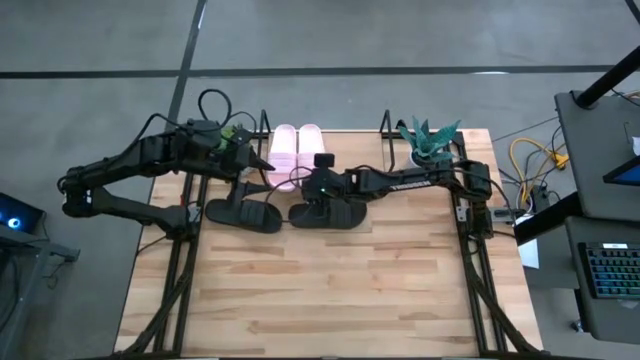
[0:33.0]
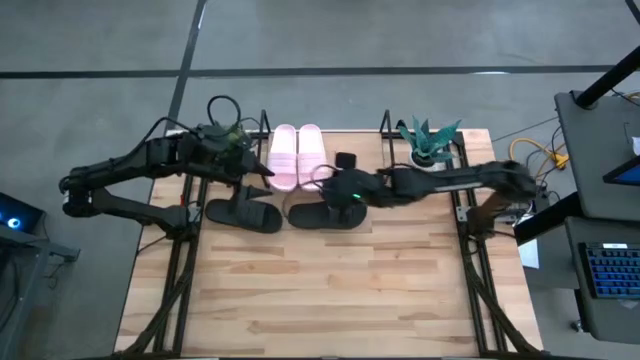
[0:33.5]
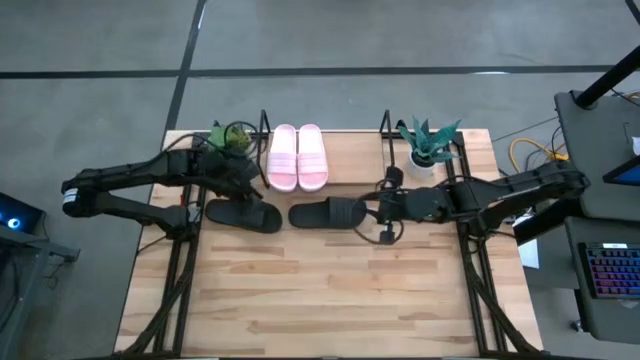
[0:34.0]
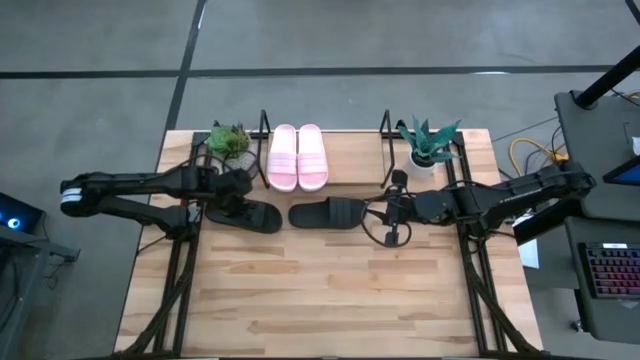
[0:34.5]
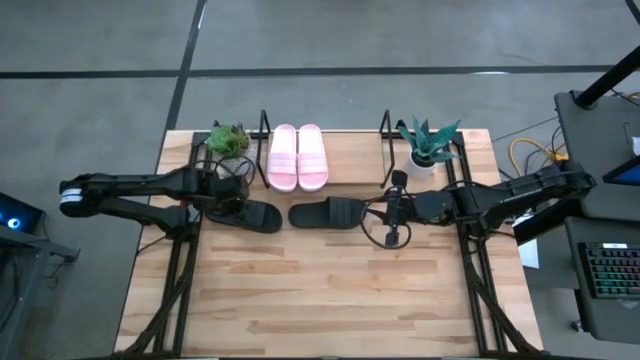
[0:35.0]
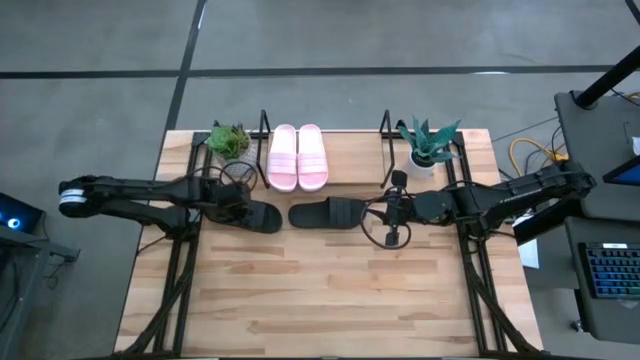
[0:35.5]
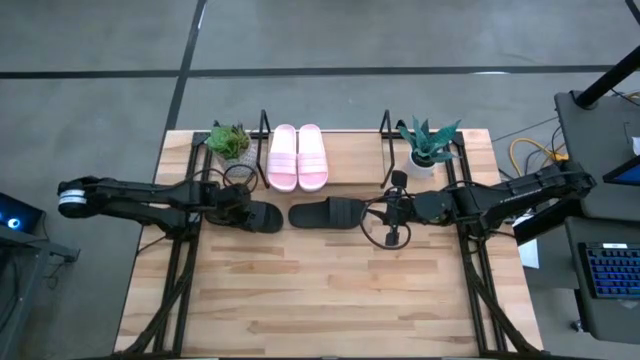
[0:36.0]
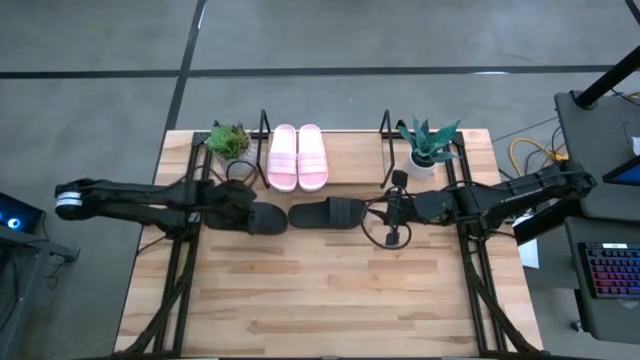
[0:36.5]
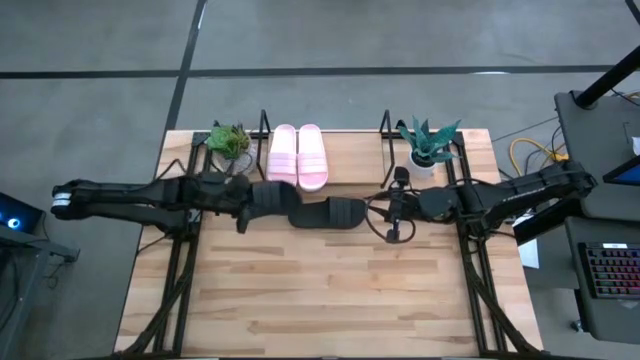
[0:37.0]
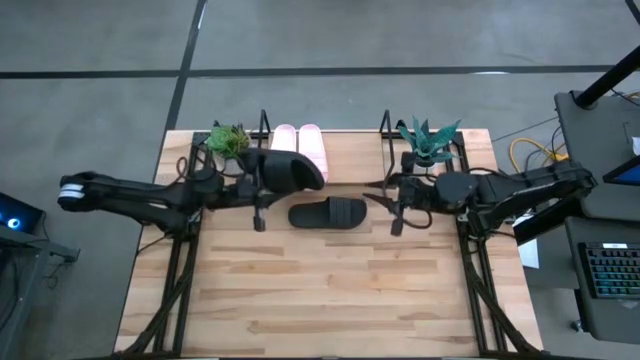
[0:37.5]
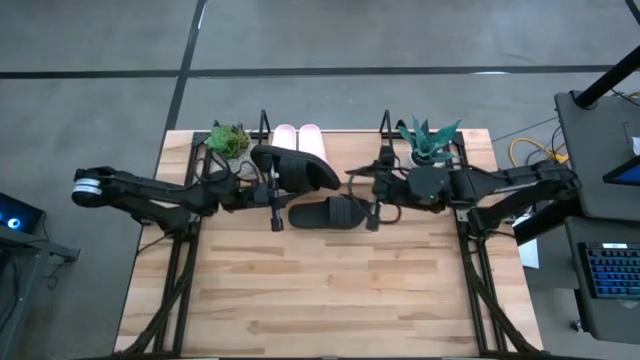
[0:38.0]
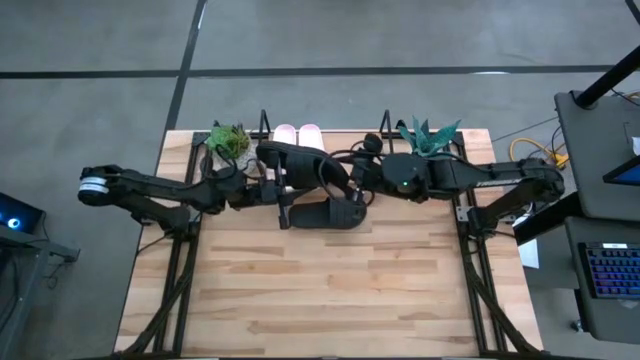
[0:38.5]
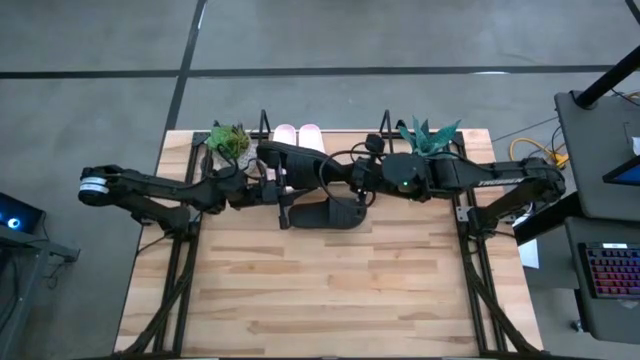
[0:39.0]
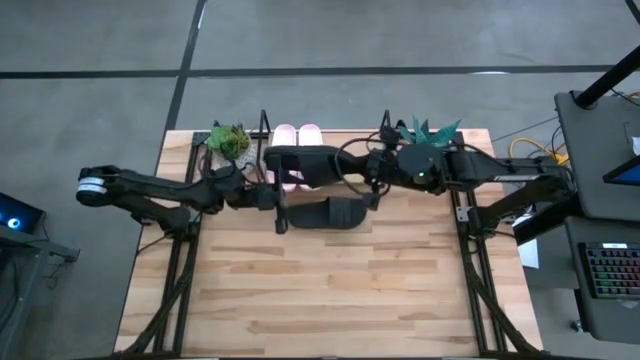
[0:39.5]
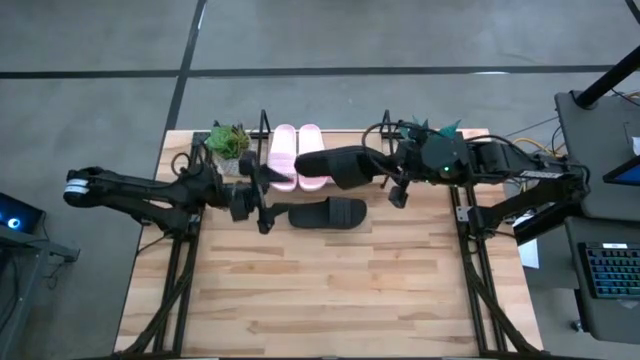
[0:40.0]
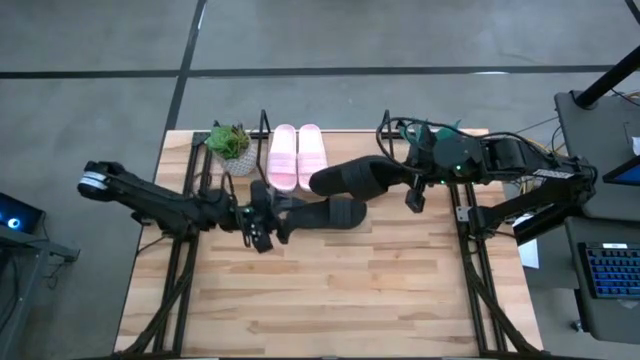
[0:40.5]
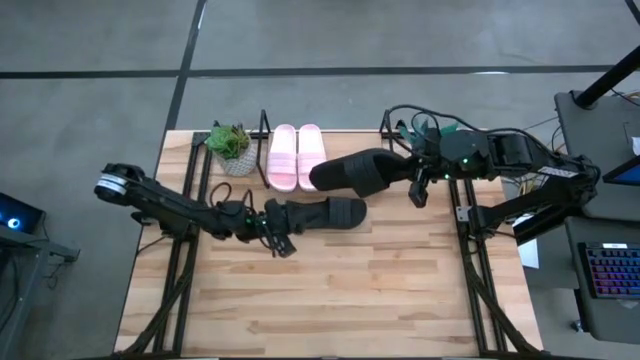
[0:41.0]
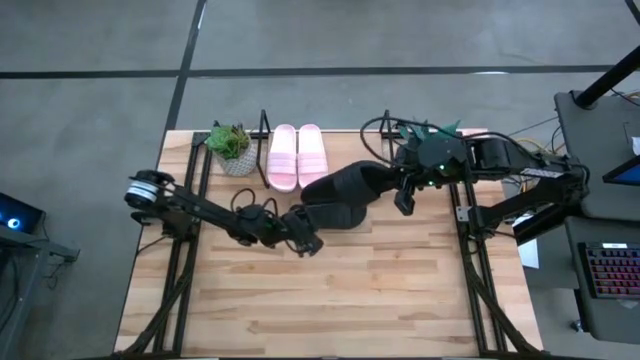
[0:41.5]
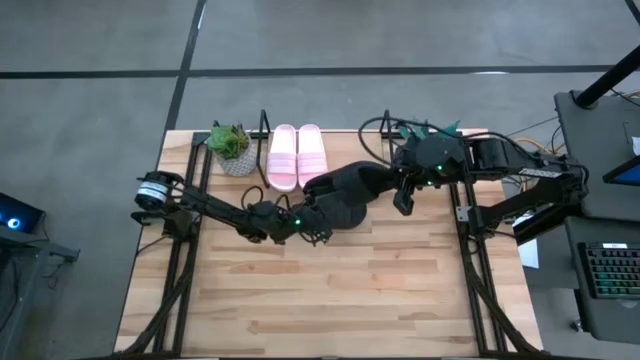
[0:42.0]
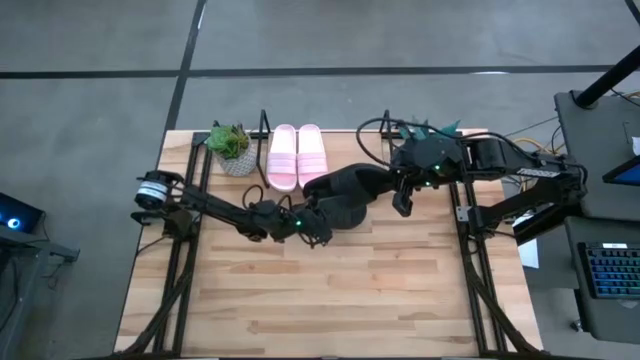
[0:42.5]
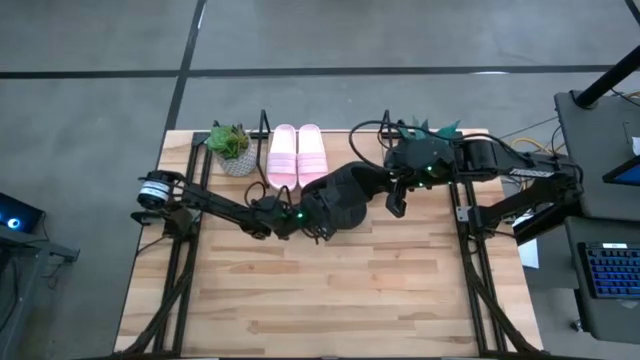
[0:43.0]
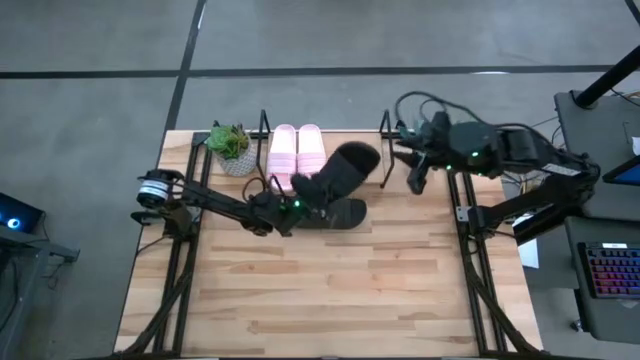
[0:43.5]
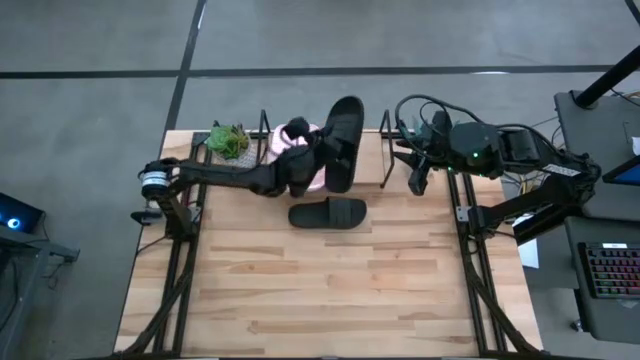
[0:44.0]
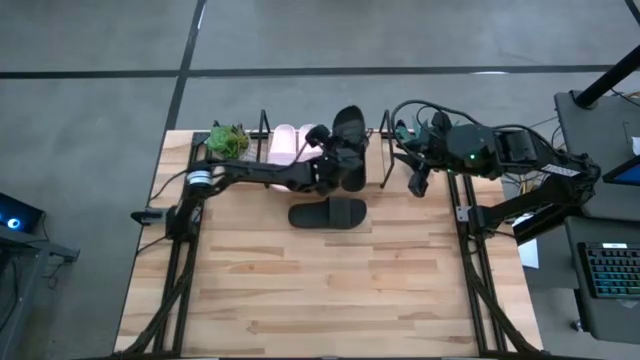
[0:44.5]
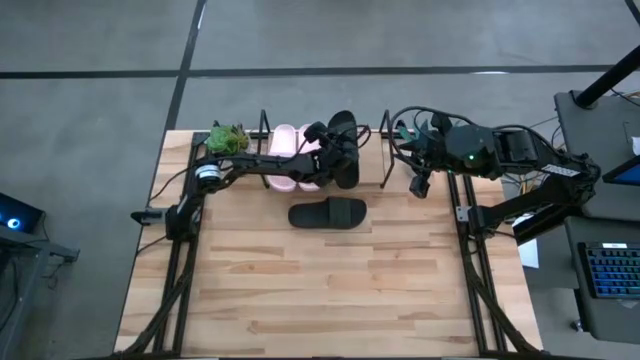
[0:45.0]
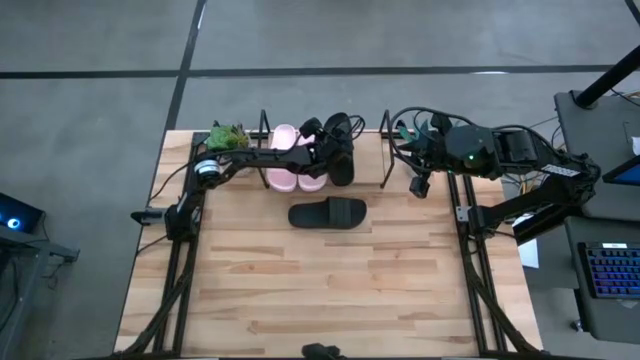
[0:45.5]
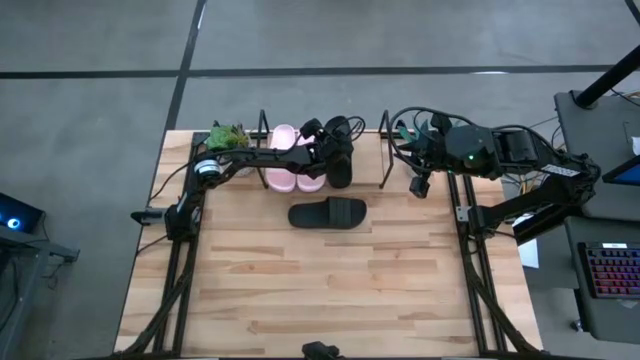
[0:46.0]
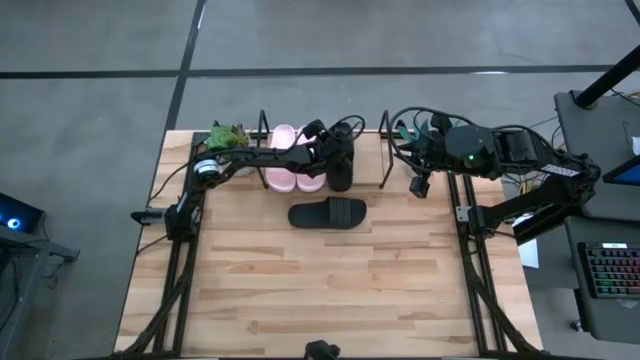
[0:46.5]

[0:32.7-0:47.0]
Task: Pick and place slides into the shelf
Put the left black slides on the shelf

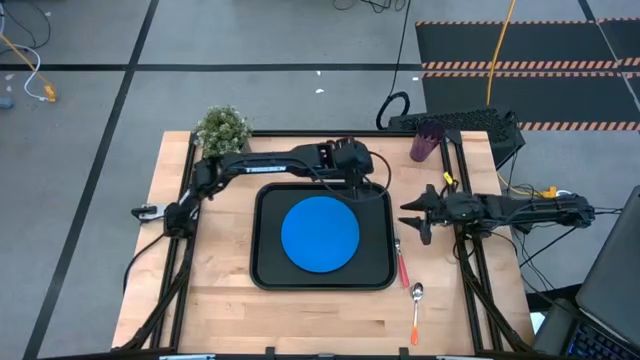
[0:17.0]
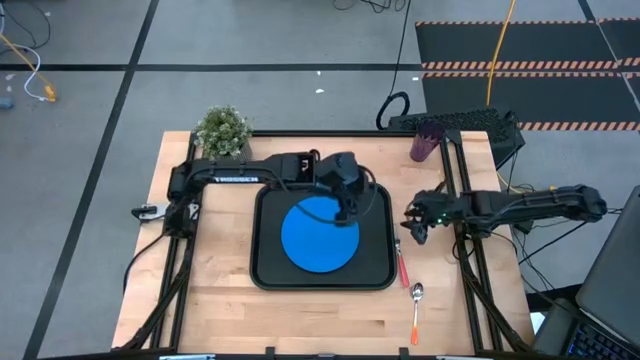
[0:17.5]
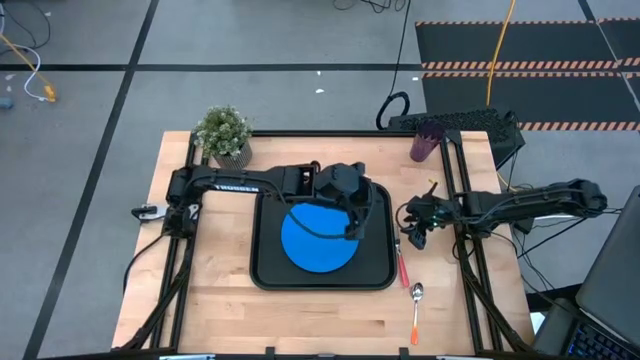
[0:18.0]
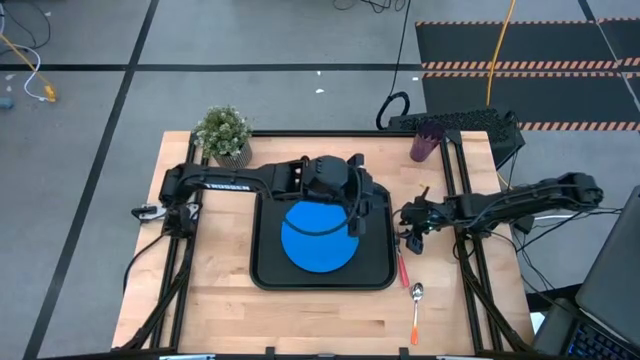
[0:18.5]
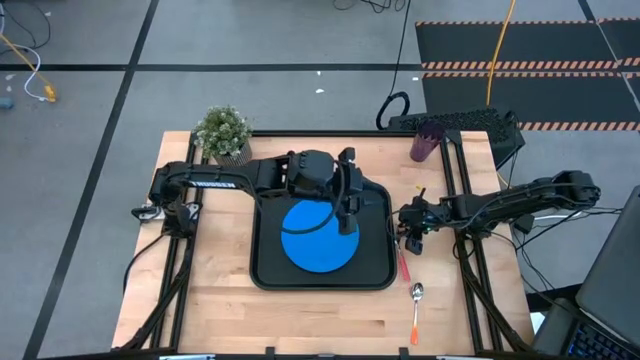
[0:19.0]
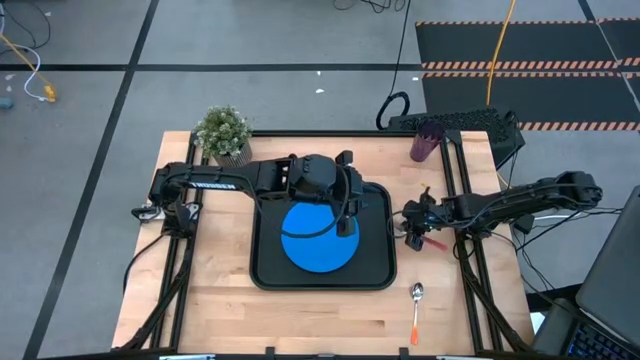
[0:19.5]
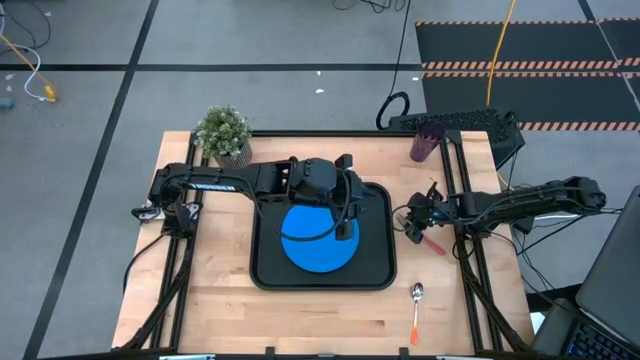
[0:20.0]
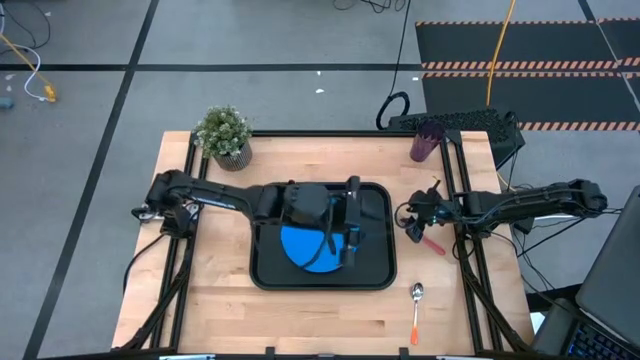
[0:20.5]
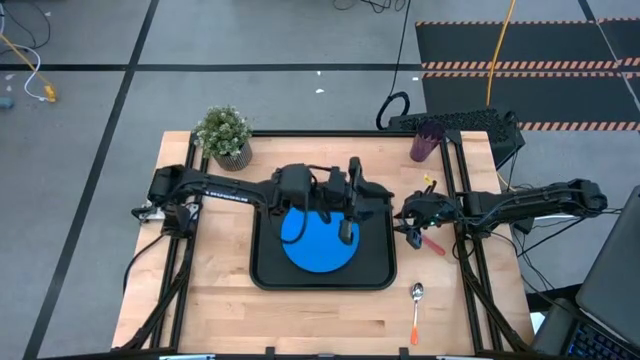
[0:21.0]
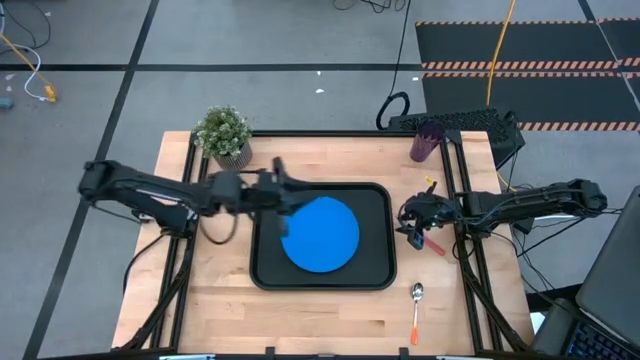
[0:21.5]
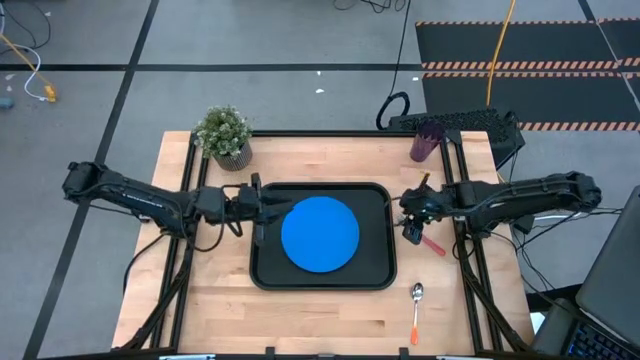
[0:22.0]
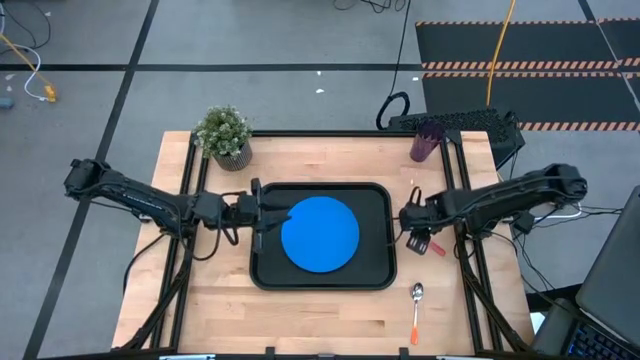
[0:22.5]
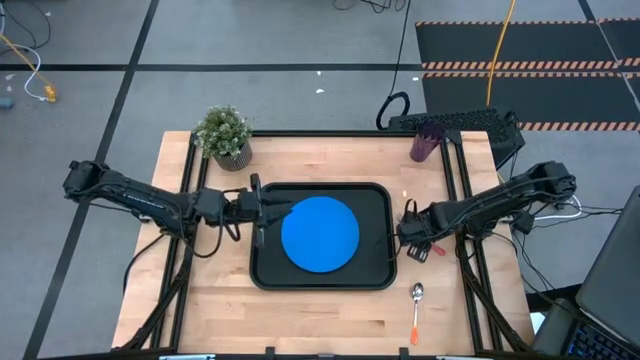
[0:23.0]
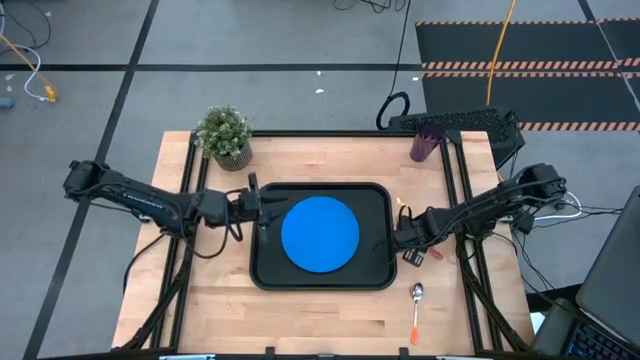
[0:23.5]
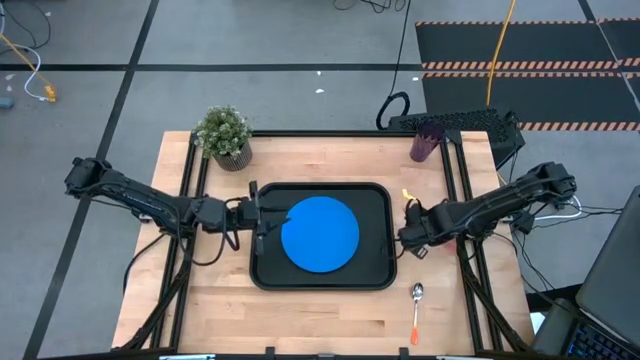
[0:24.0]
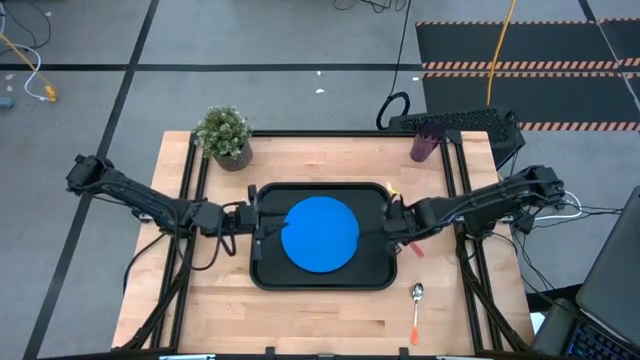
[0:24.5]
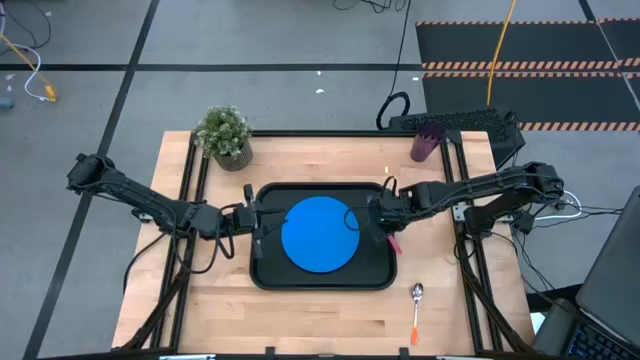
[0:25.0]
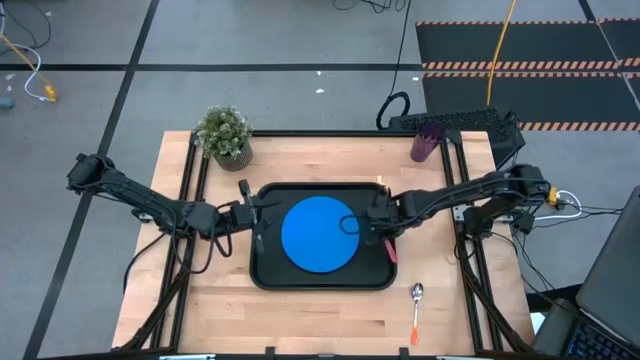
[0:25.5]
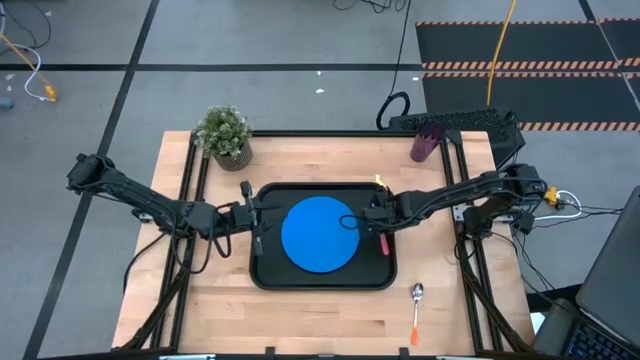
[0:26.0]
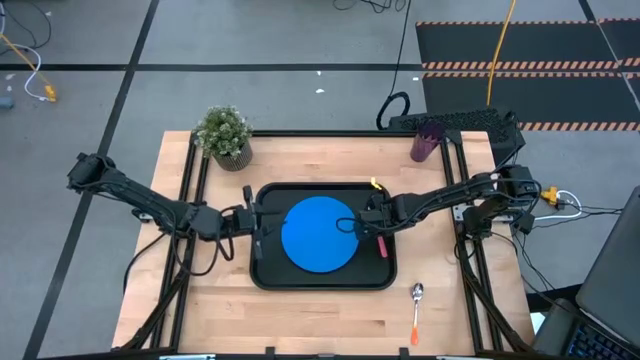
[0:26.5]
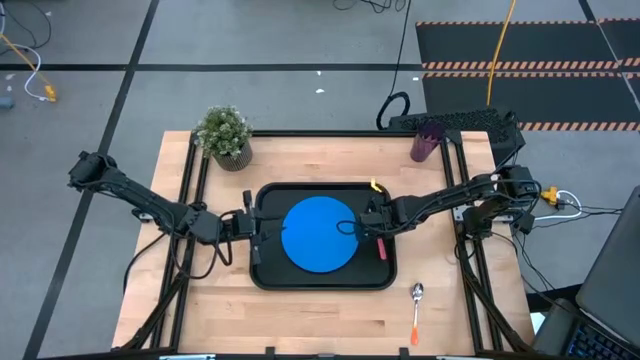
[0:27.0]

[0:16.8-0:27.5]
Task: Pick and place plate/cup/fork/spoon on tray
Put the pink fork to the right of the black tray
